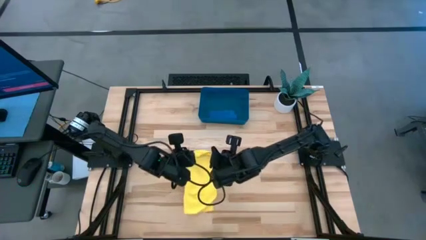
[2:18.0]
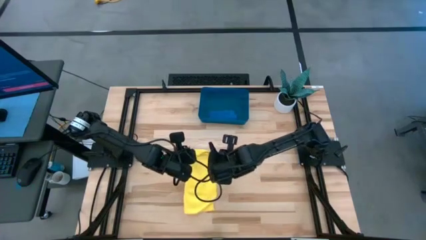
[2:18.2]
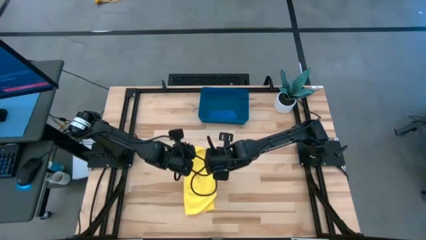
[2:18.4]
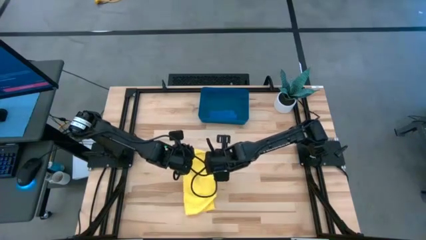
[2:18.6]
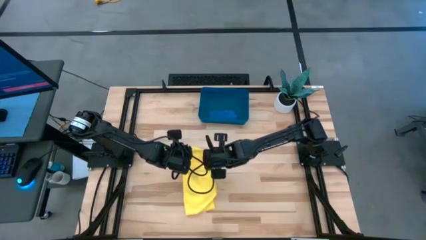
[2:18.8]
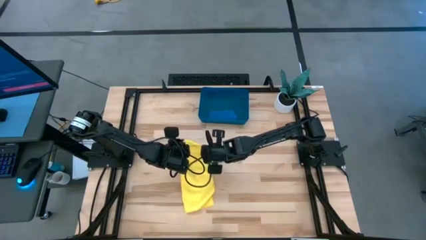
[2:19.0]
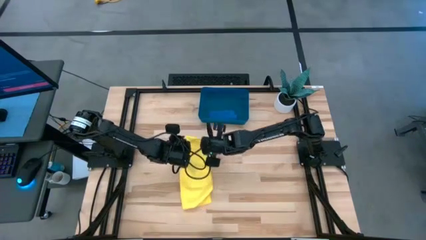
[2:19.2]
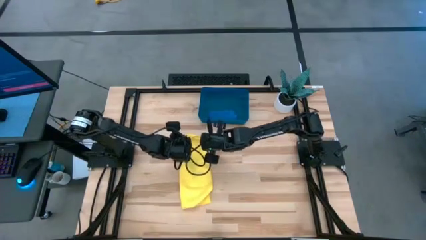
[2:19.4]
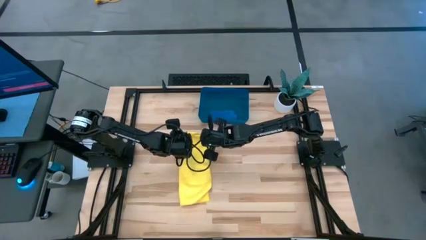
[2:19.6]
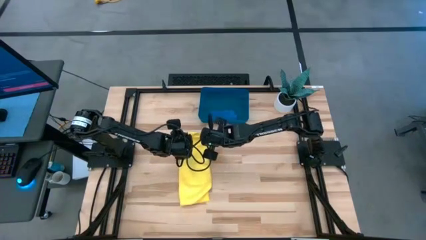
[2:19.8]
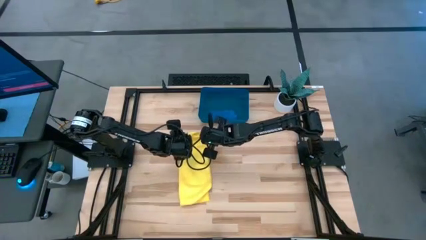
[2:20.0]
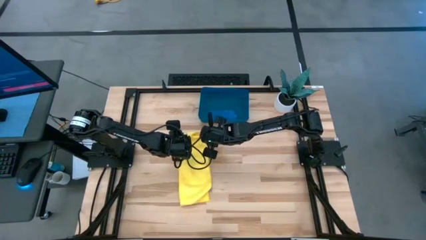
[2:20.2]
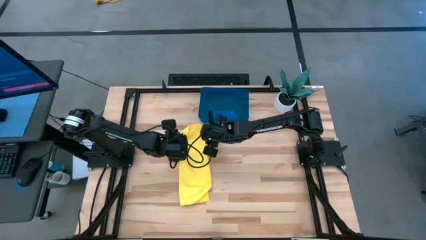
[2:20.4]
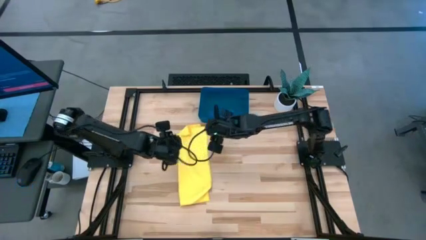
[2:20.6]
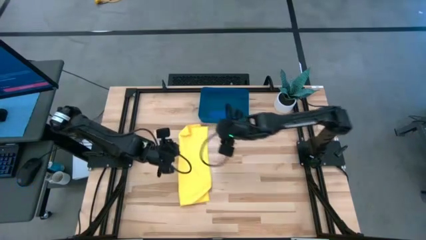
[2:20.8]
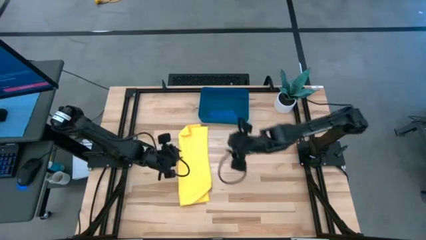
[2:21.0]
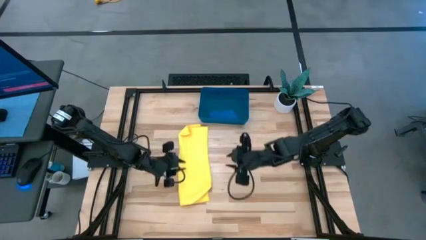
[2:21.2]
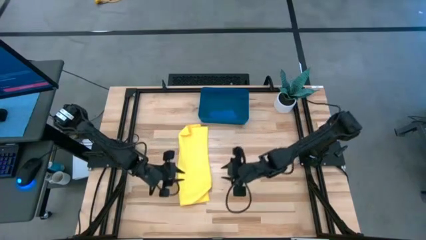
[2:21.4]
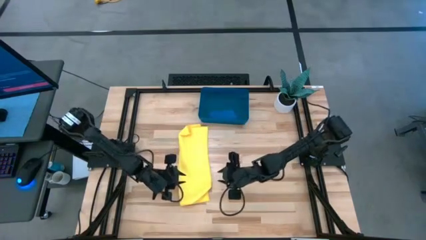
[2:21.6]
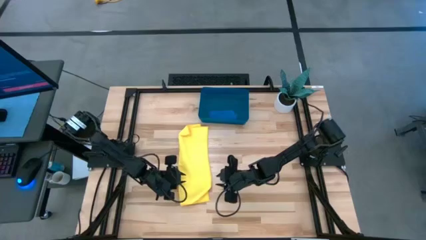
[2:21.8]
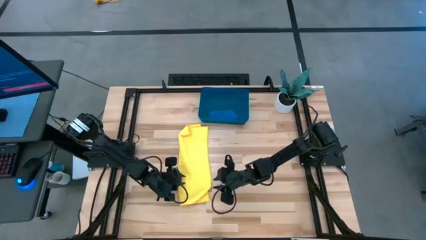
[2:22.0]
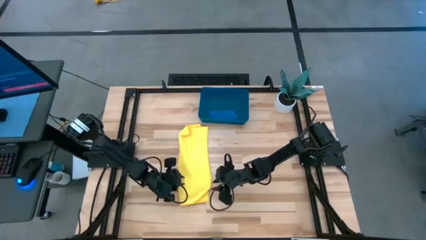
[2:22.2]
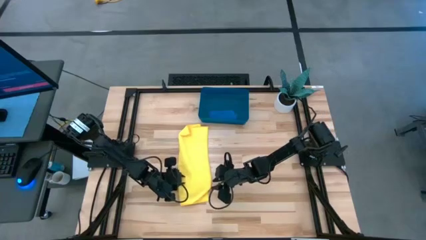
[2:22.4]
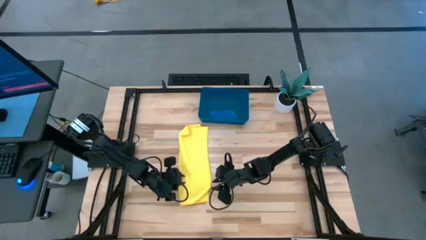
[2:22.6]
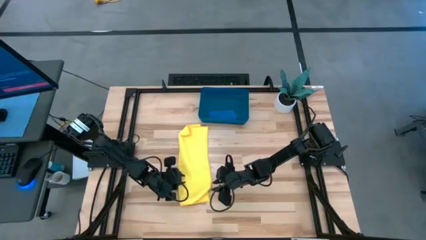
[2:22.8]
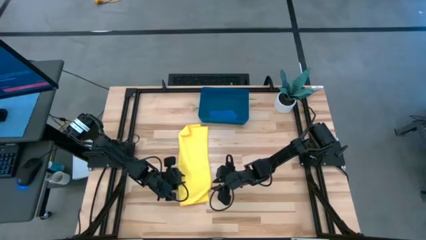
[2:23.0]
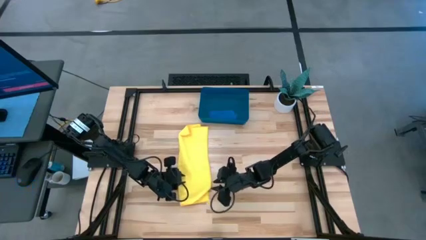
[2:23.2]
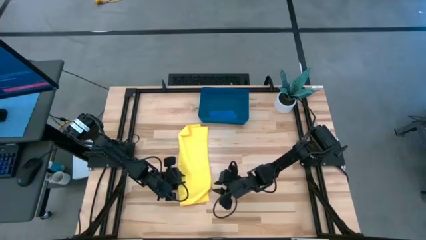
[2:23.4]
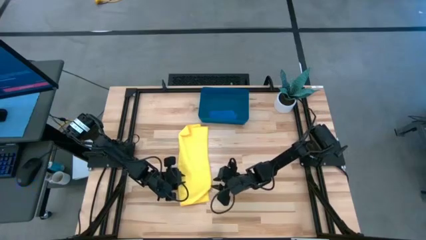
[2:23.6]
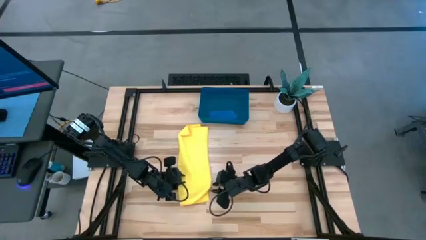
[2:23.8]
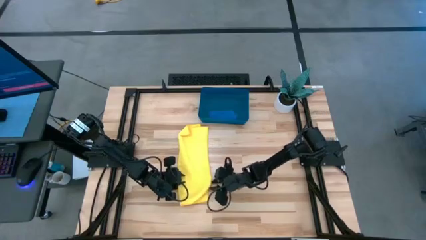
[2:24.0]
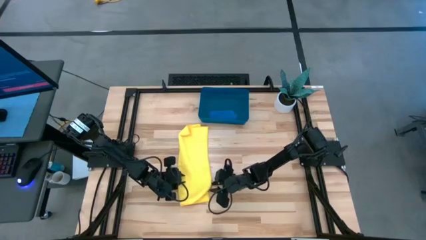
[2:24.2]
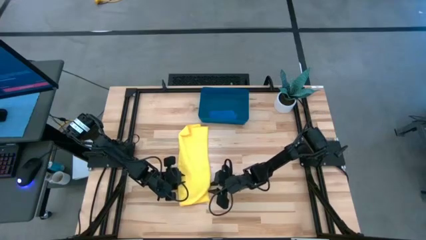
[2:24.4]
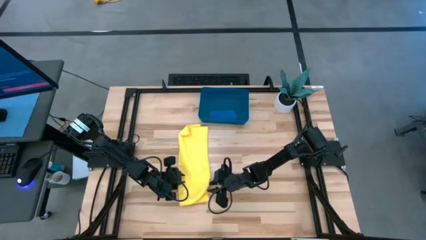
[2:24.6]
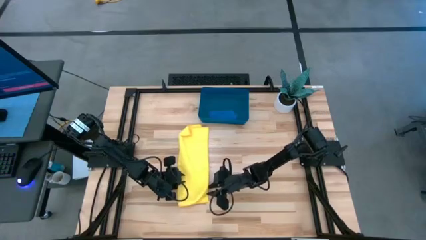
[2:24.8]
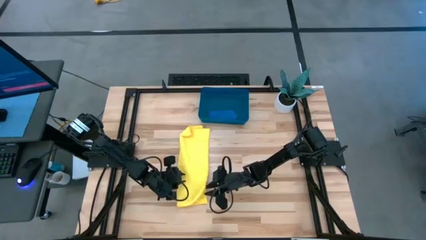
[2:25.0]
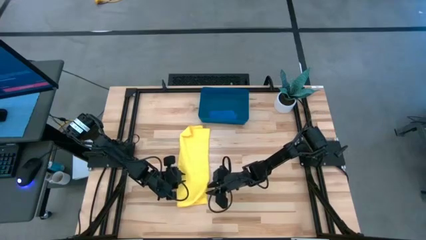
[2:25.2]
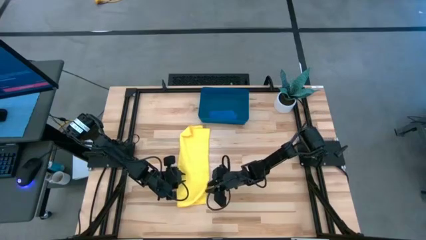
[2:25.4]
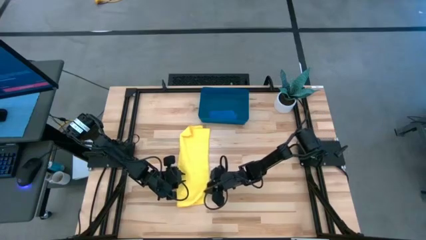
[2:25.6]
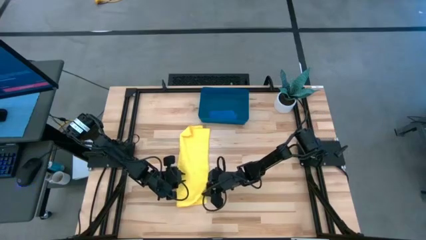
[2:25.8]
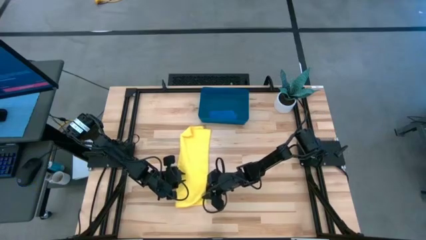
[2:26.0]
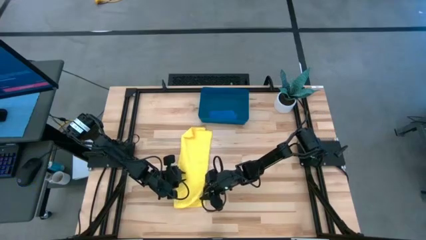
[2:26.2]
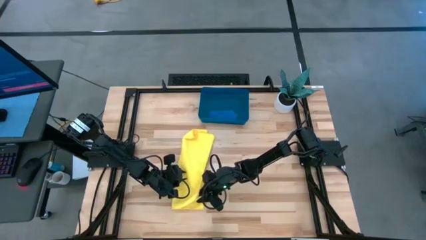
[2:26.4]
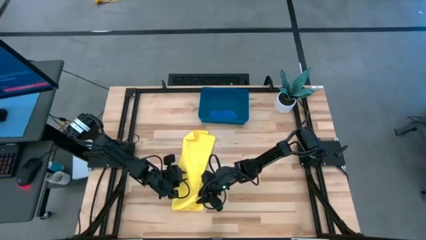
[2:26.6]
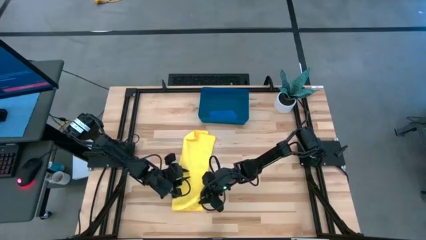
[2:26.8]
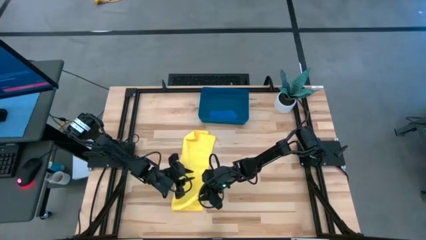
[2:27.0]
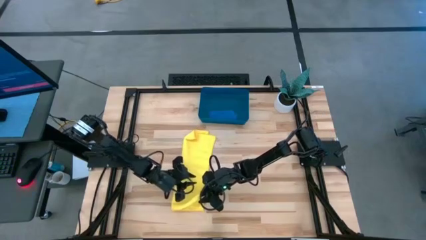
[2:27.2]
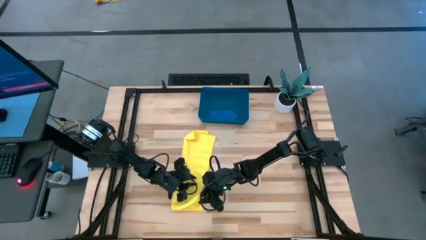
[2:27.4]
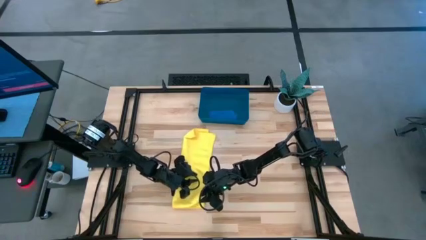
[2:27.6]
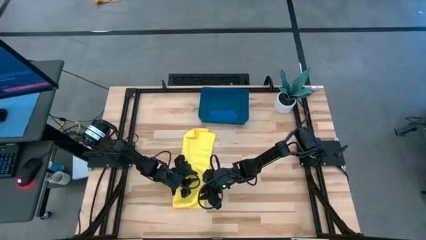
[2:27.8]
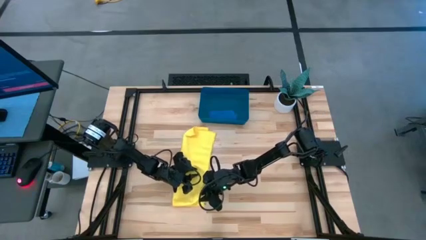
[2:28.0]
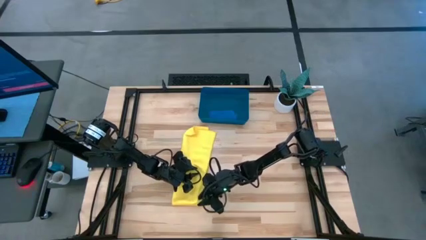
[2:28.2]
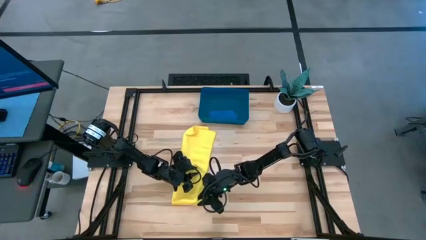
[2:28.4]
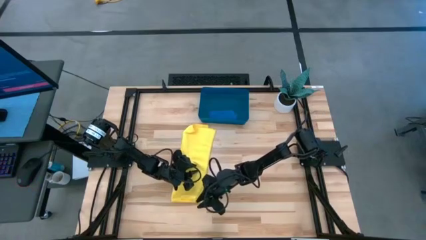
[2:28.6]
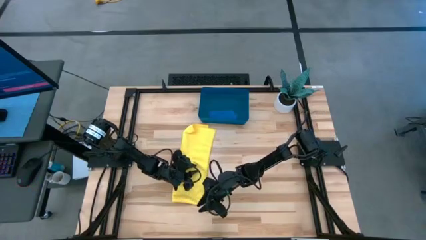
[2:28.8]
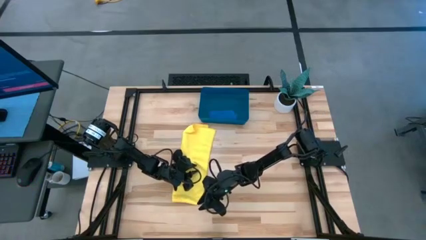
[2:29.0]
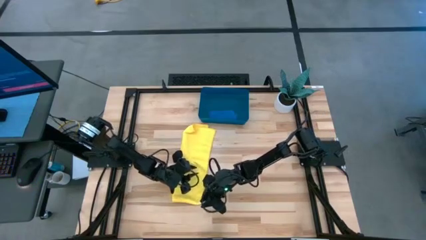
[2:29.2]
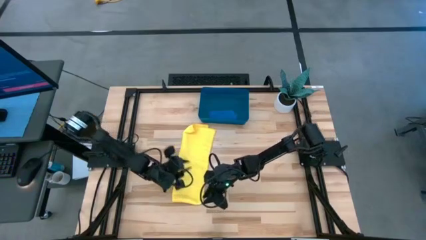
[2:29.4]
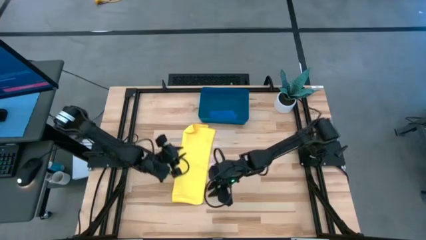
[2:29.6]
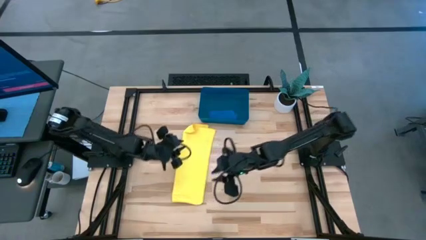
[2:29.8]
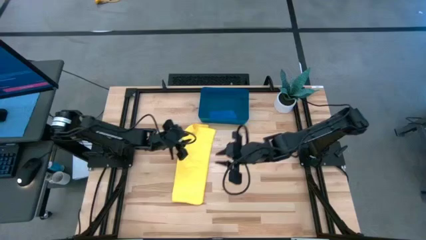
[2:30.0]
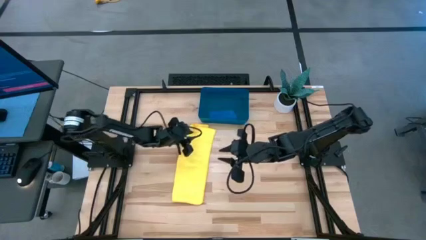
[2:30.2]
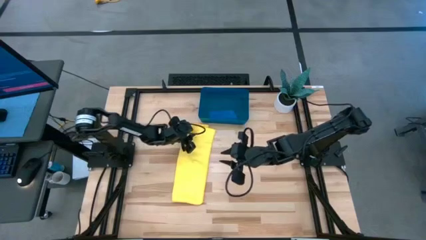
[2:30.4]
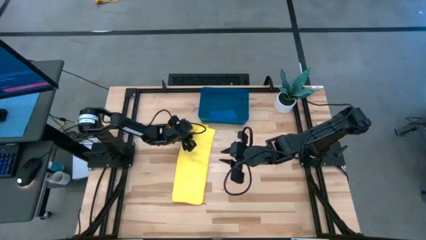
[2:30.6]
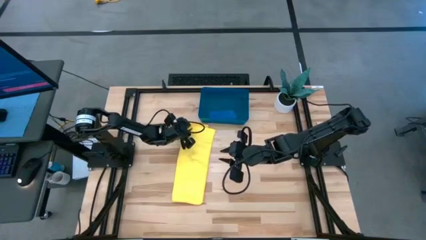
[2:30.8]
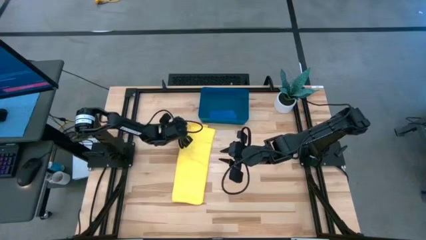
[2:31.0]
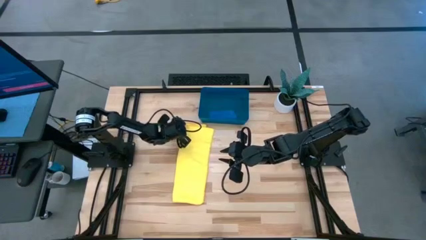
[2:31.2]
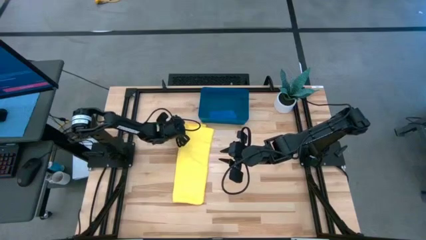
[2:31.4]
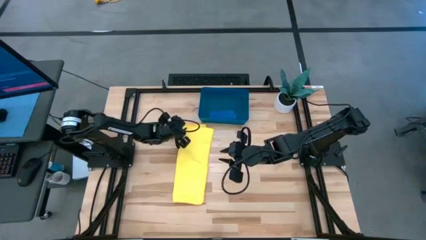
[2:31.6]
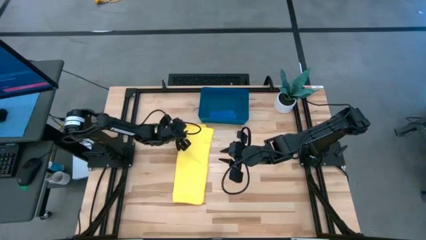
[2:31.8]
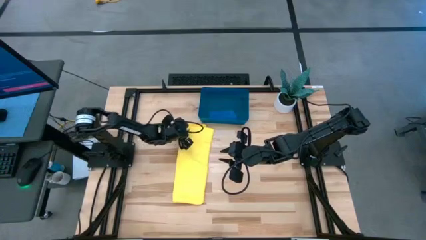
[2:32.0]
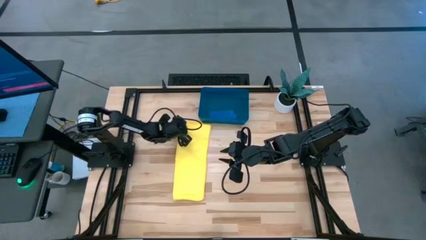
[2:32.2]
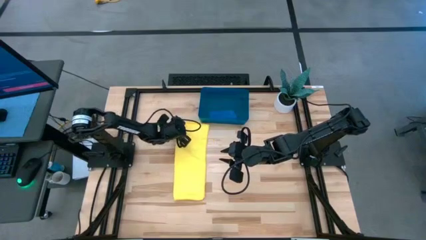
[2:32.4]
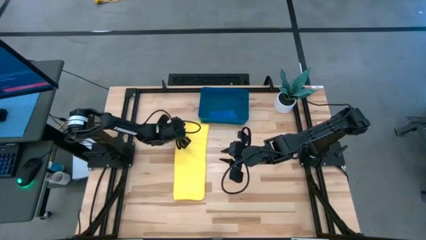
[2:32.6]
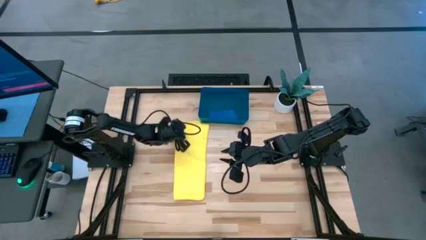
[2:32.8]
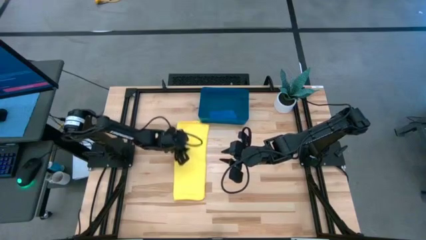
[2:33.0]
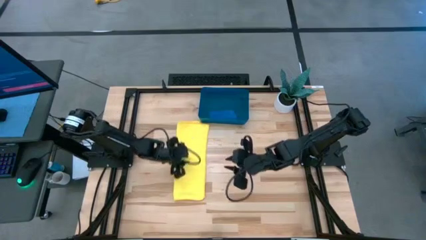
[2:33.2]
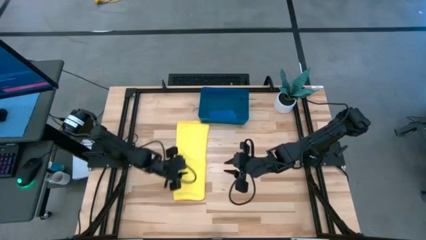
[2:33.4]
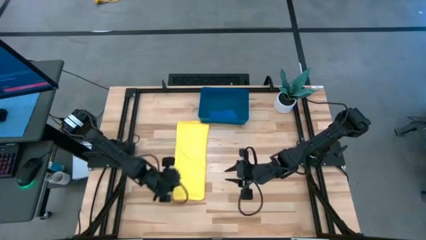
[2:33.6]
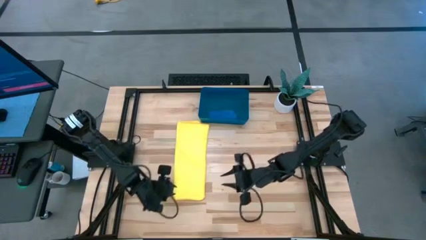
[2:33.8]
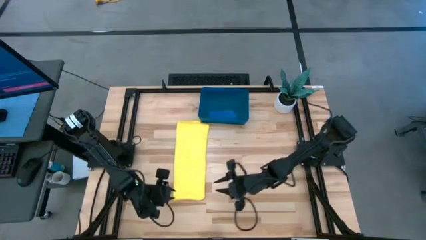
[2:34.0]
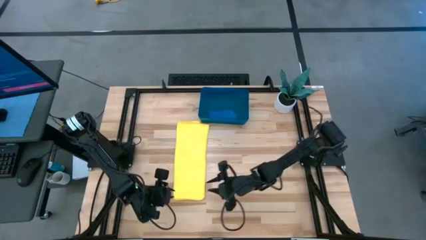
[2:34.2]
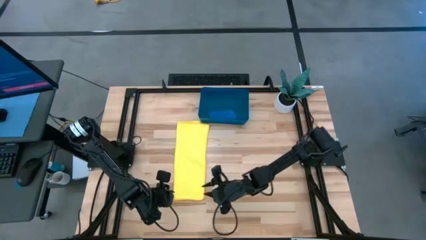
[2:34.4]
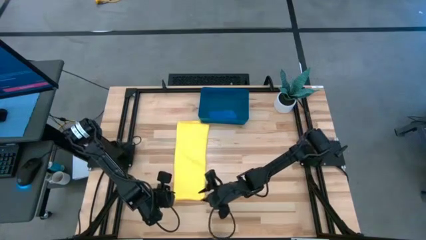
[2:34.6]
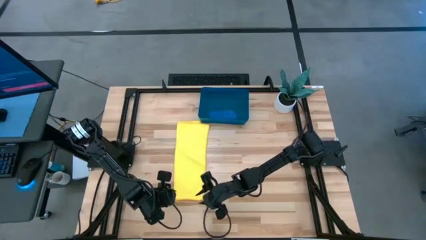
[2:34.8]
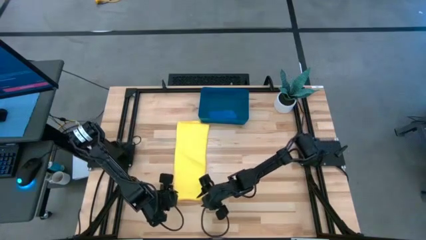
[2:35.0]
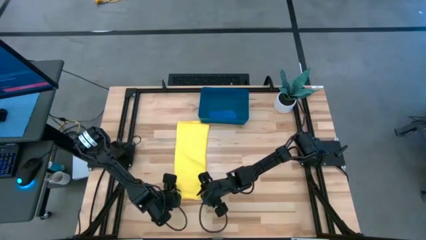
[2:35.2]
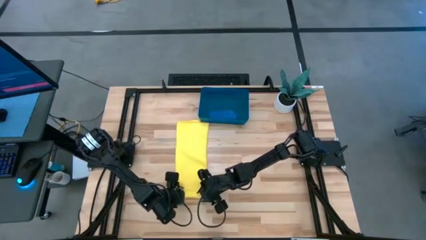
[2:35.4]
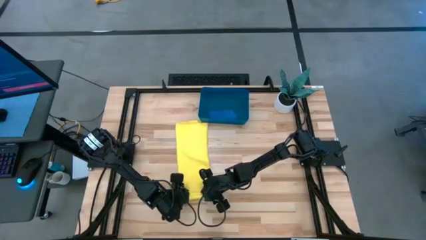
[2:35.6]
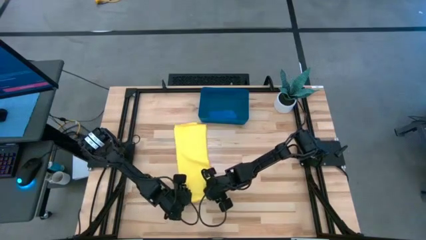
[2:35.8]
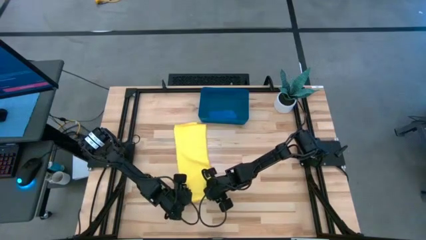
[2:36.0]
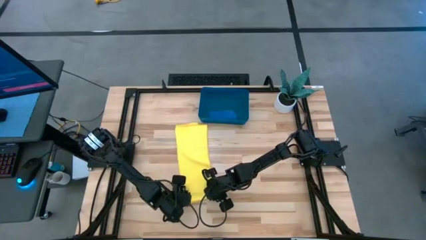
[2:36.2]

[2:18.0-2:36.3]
Task: Roll microfiber towels into tight, uniform cylinder then place into a basket
Roll the yellow microfiber cloth
